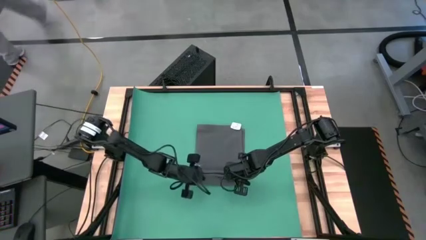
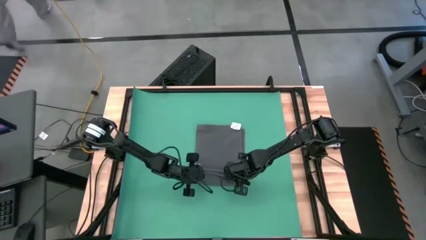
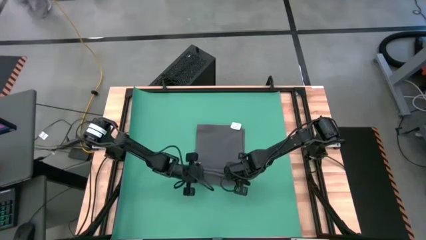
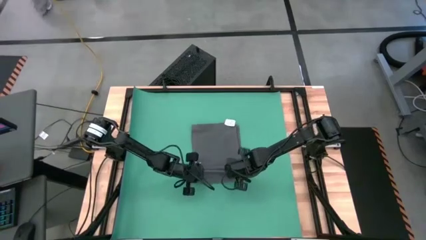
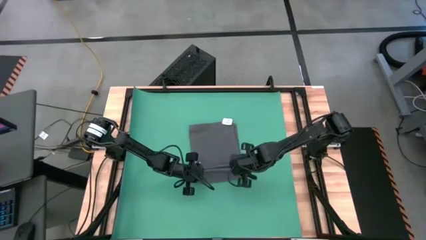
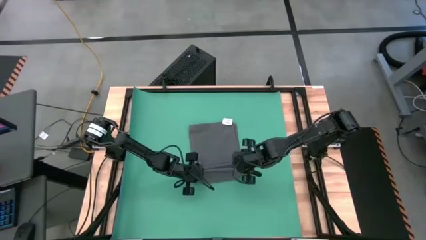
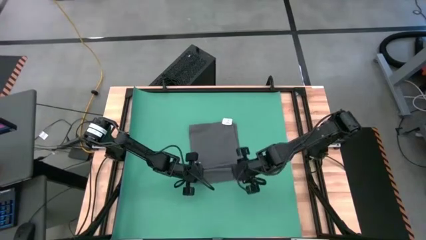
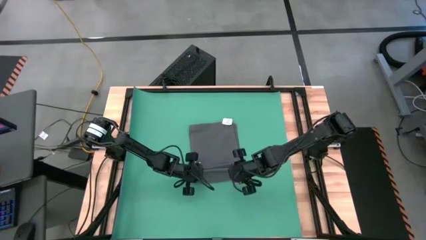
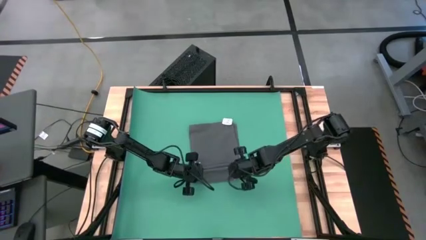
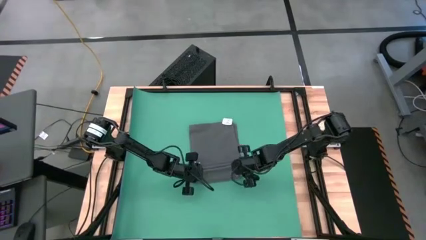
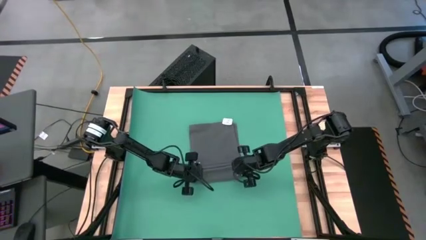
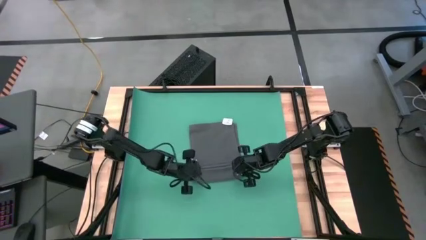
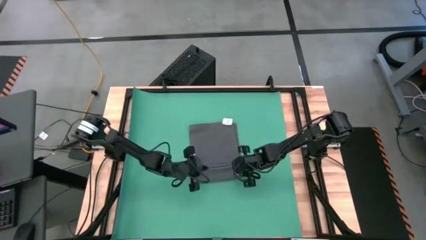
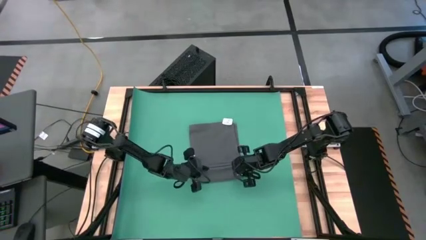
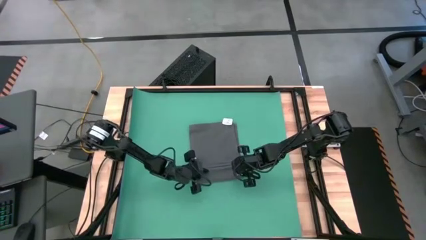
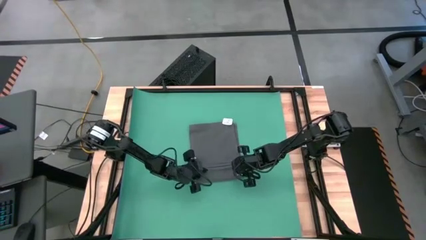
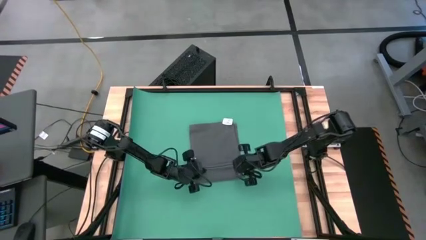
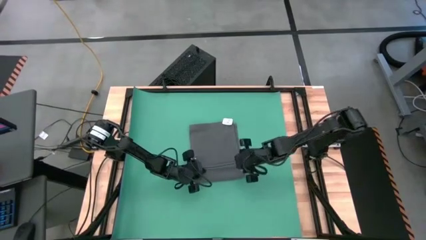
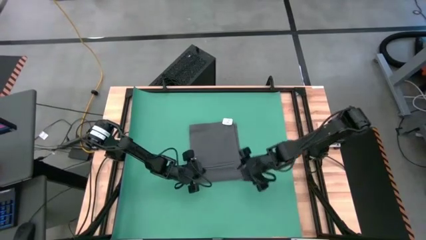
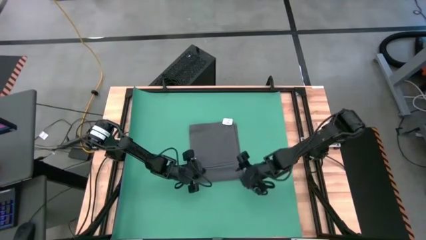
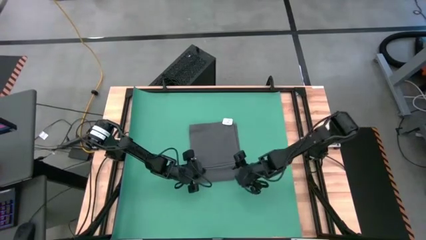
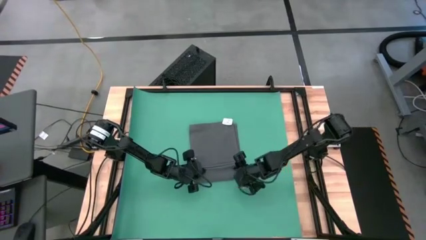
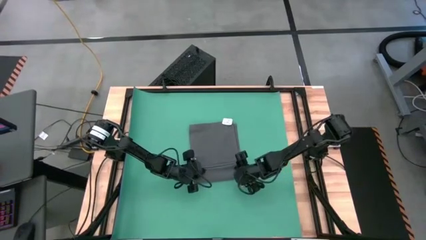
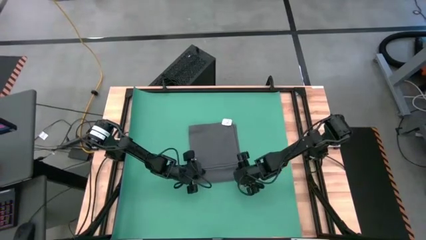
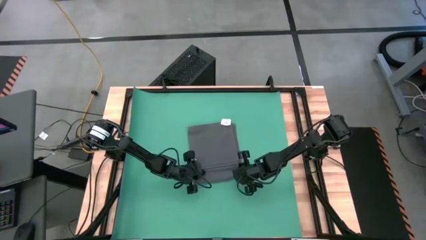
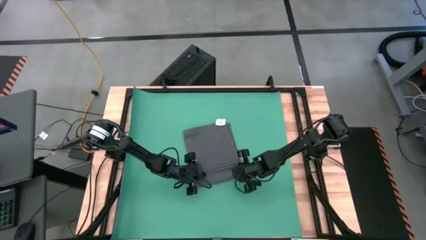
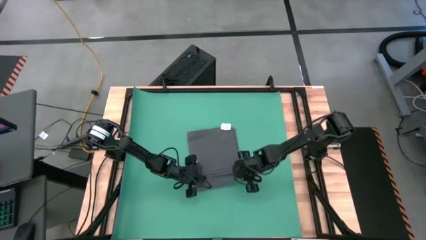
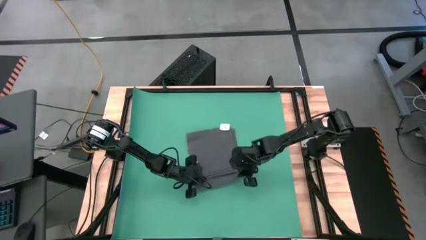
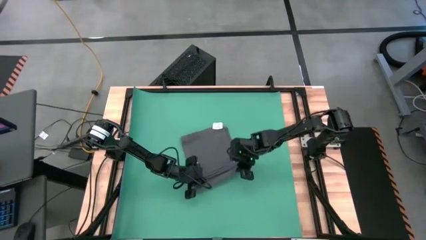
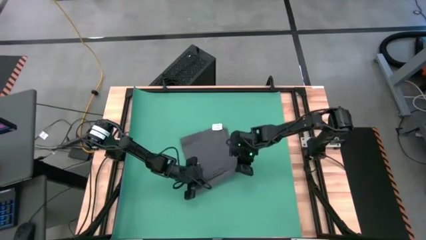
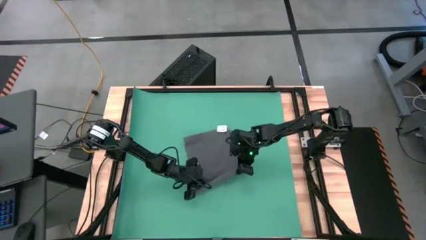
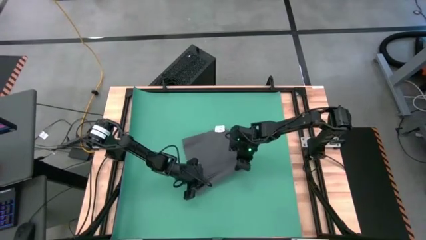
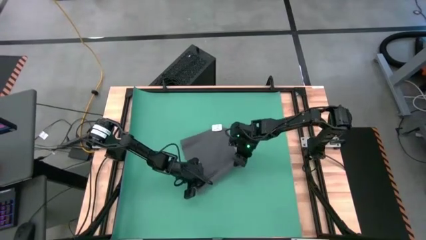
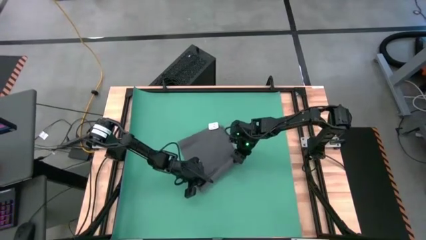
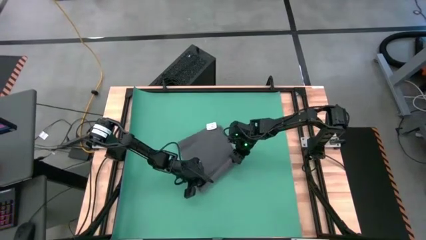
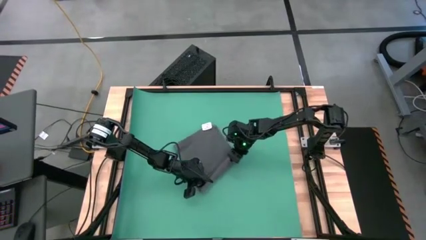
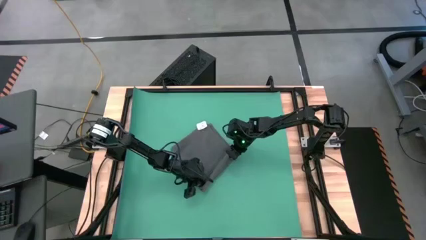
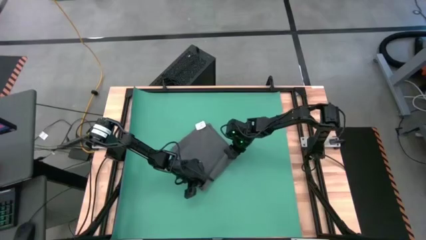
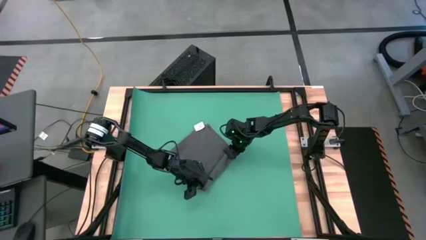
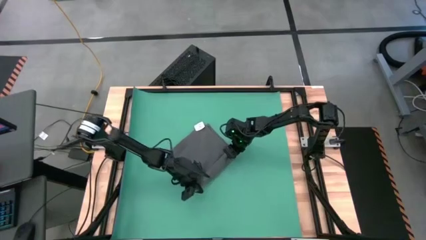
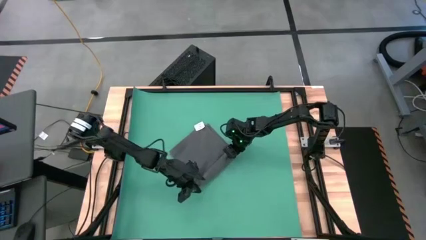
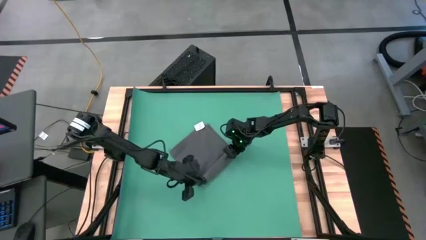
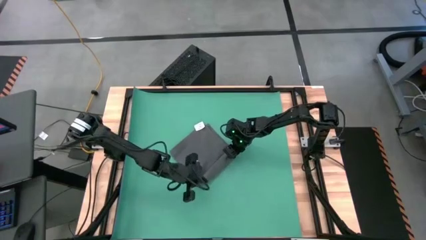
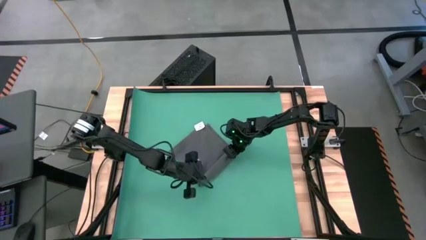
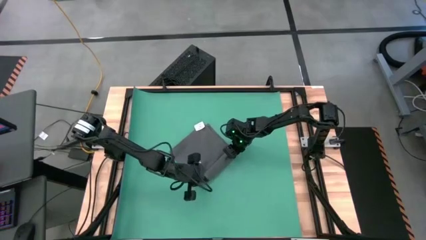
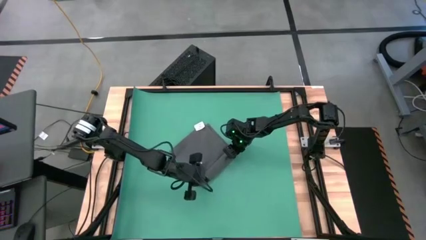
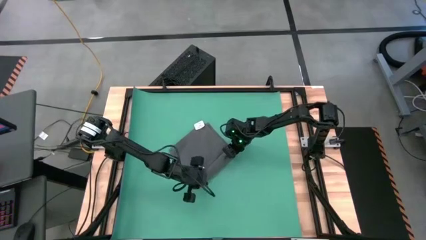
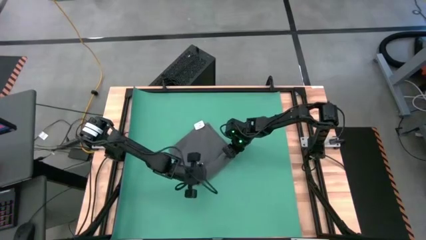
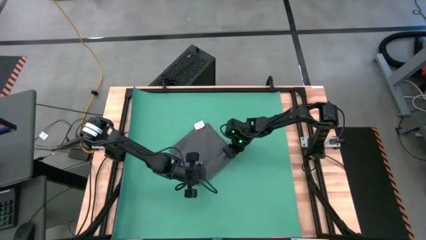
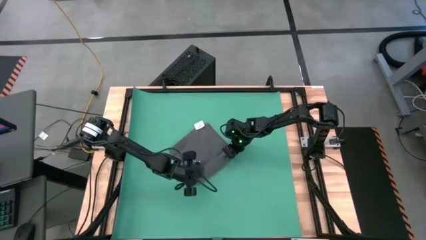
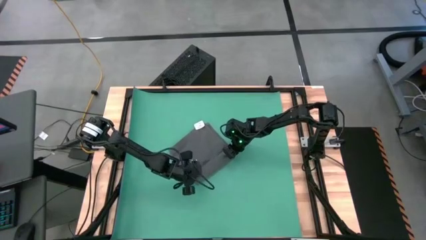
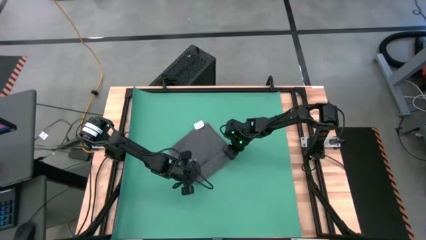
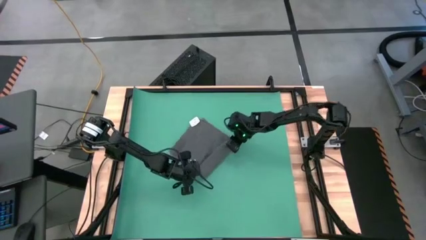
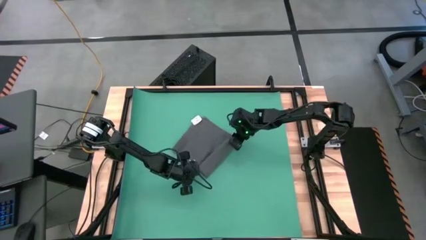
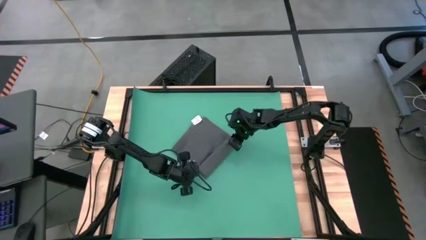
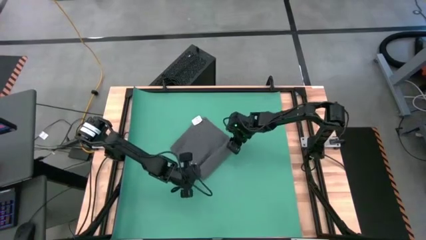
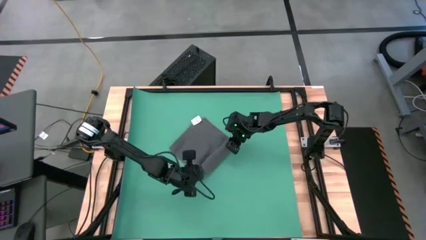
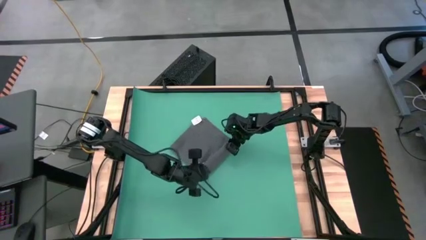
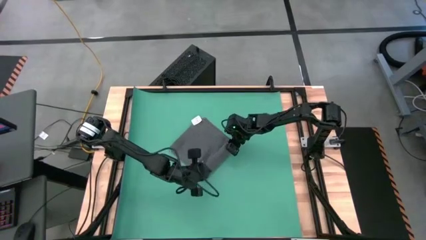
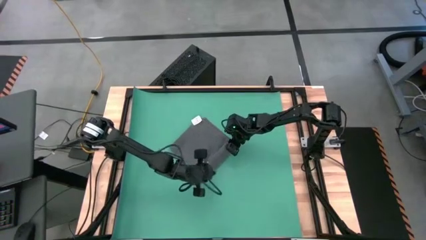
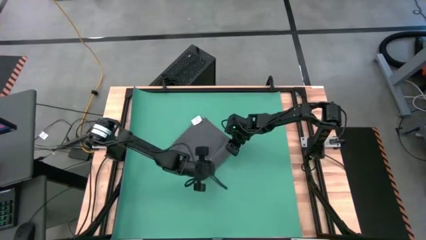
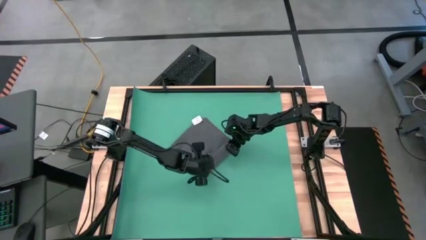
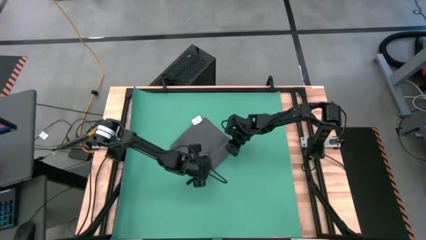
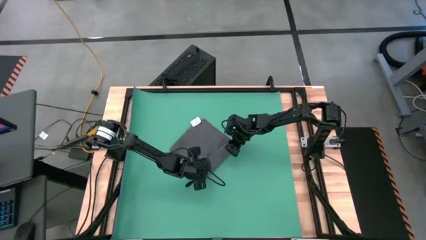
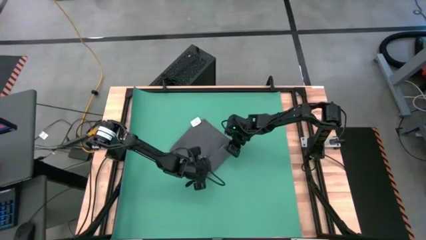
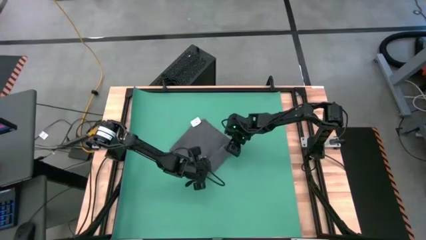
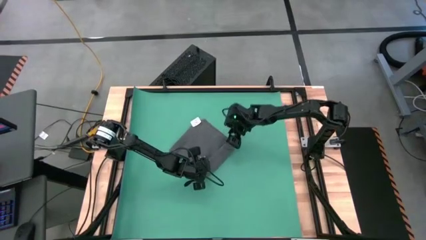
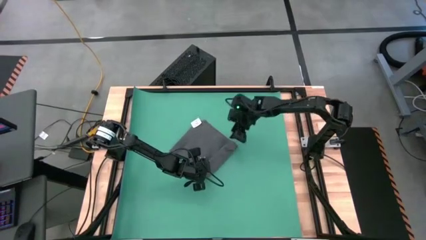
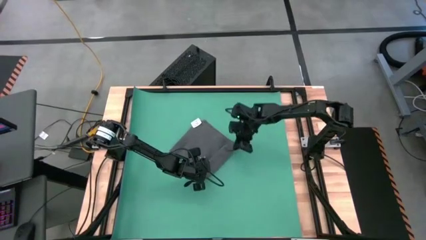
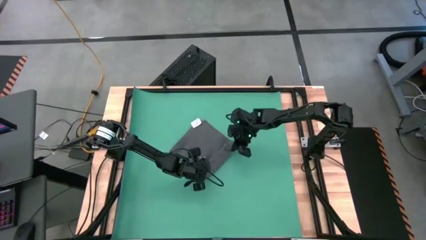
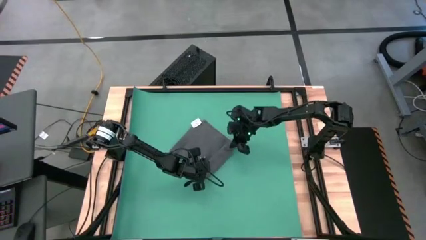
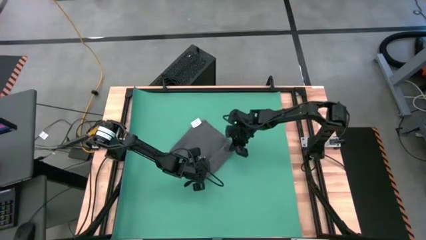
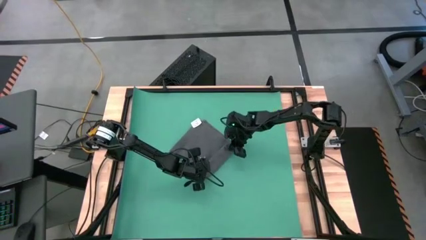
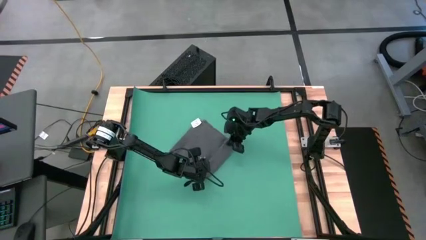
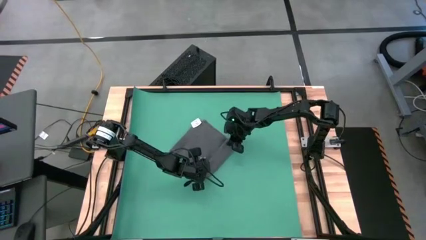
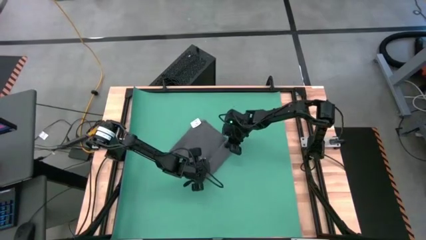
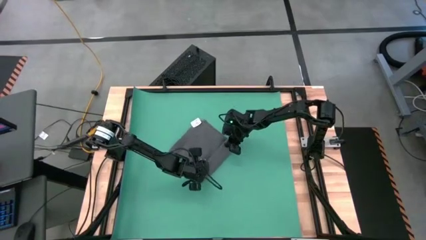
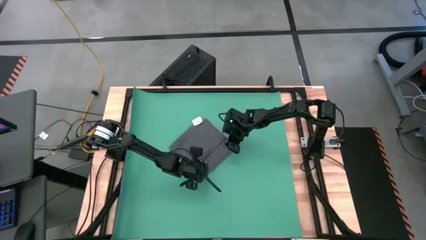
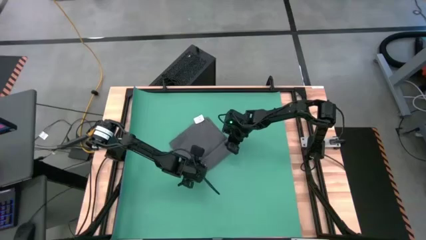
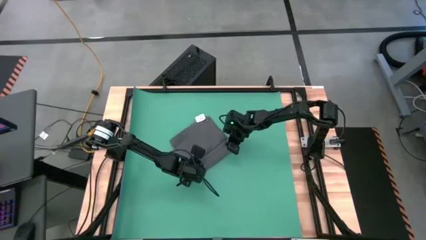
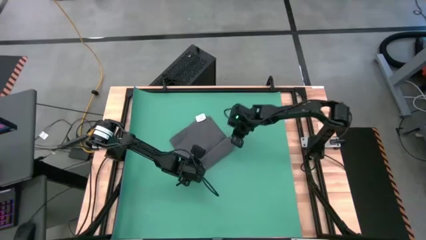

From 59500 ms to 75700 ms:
Task: Roll towel
Roll the gray towel
